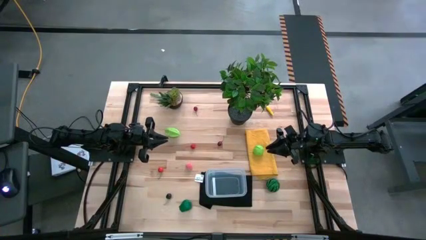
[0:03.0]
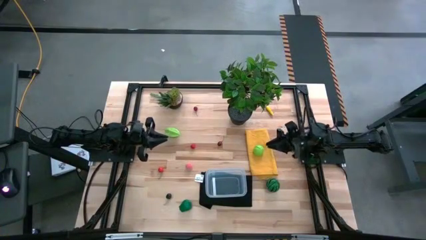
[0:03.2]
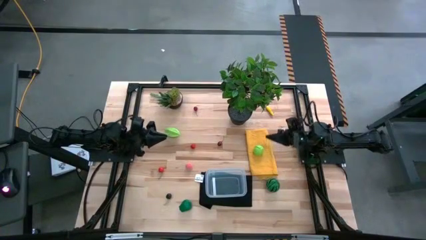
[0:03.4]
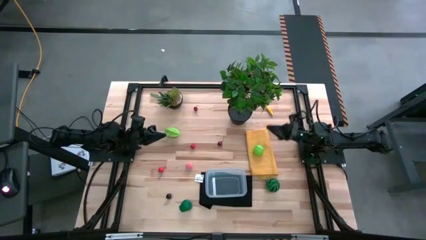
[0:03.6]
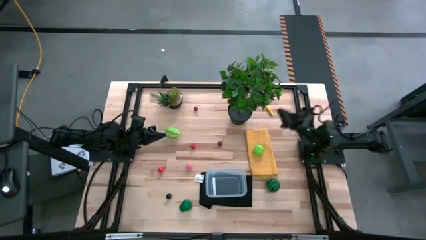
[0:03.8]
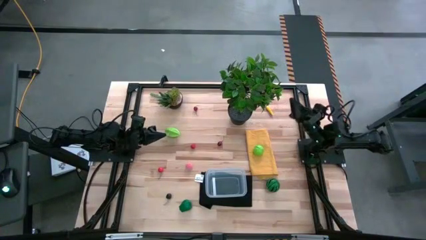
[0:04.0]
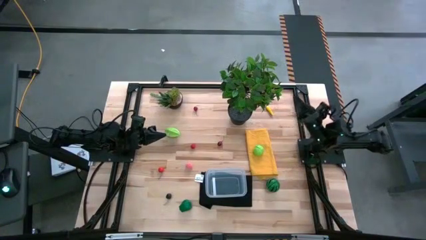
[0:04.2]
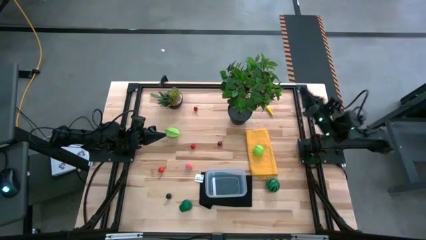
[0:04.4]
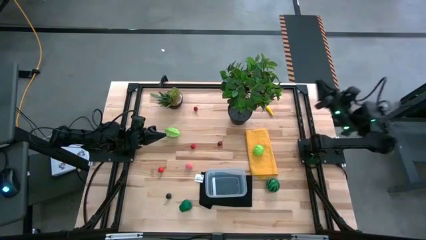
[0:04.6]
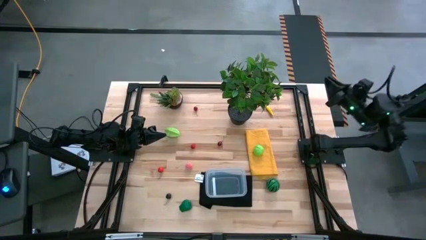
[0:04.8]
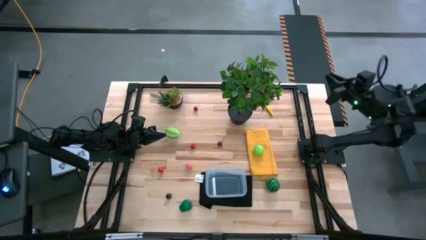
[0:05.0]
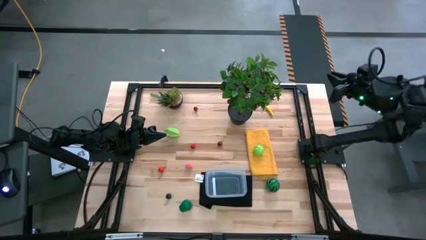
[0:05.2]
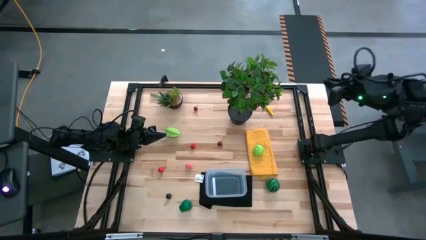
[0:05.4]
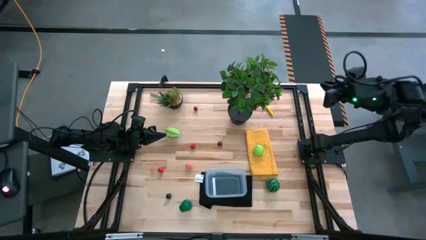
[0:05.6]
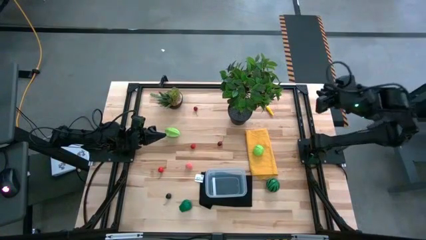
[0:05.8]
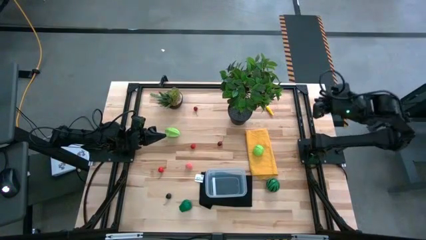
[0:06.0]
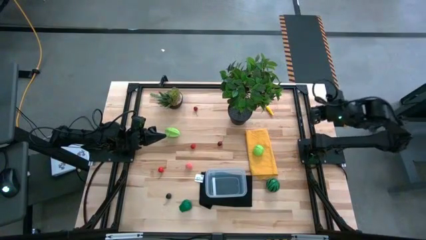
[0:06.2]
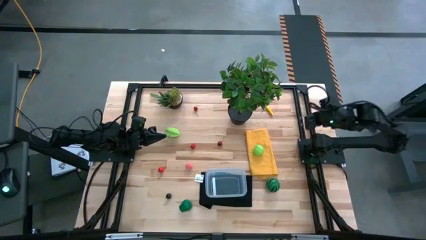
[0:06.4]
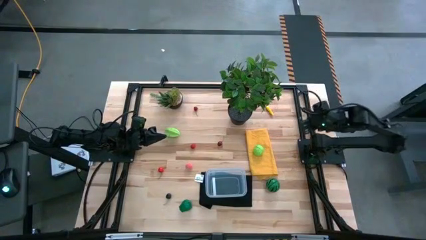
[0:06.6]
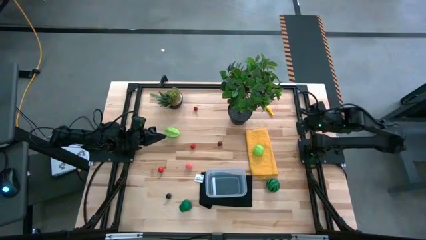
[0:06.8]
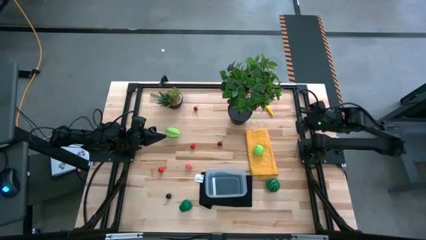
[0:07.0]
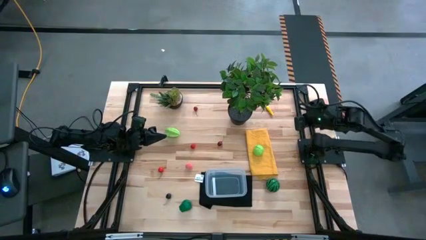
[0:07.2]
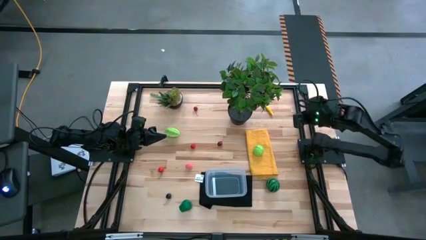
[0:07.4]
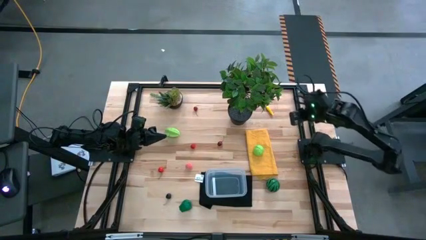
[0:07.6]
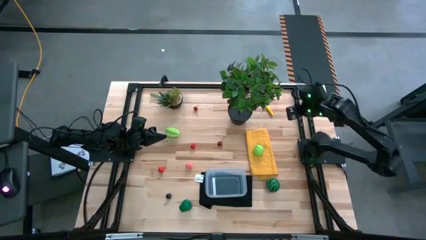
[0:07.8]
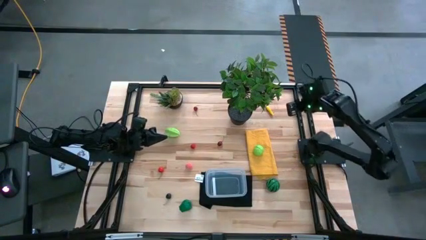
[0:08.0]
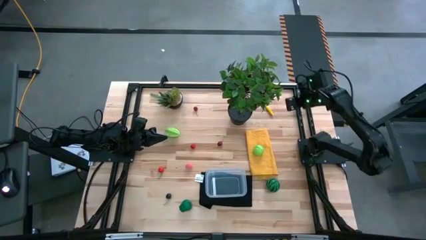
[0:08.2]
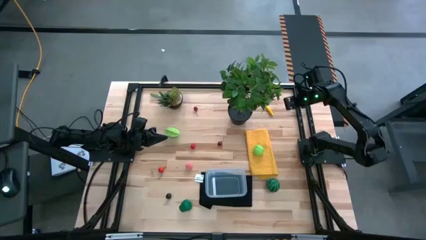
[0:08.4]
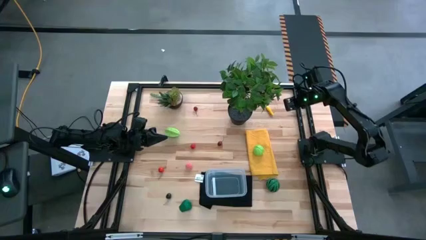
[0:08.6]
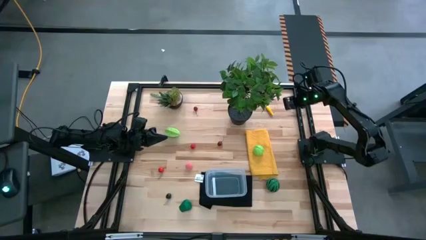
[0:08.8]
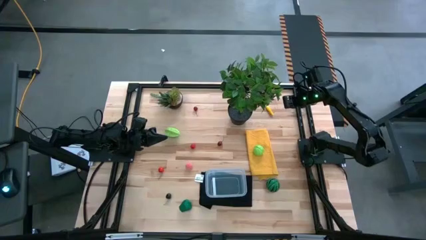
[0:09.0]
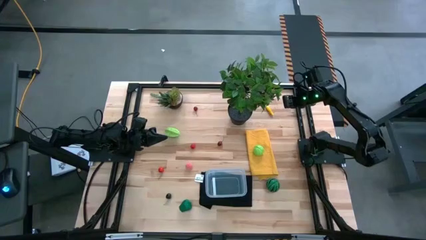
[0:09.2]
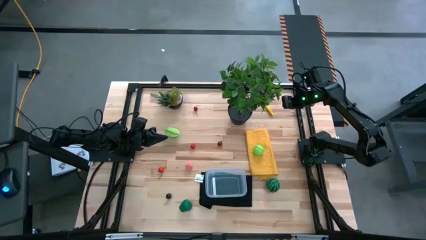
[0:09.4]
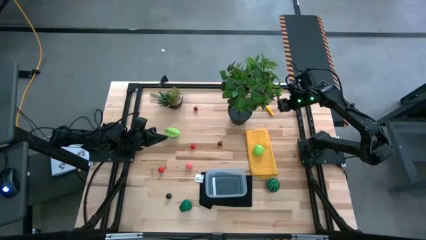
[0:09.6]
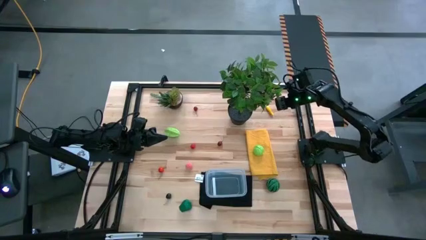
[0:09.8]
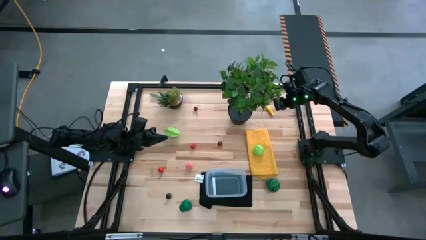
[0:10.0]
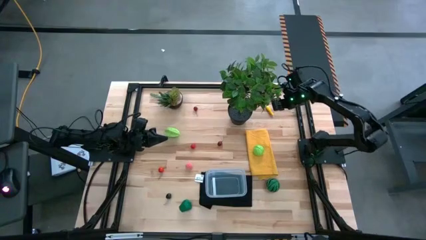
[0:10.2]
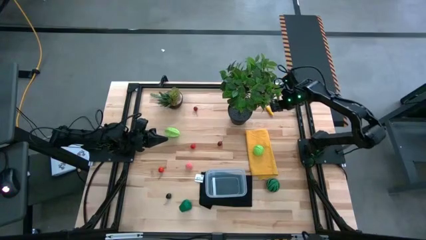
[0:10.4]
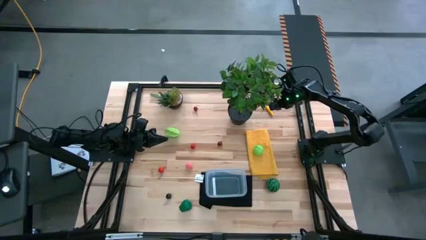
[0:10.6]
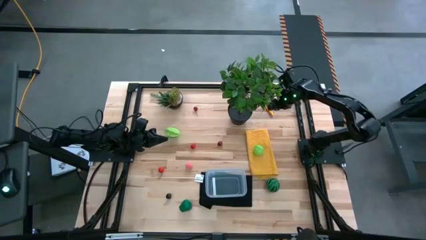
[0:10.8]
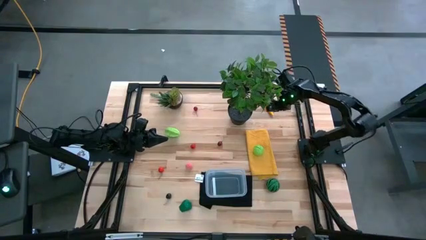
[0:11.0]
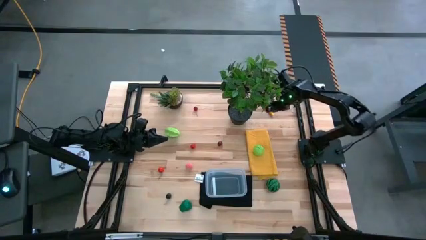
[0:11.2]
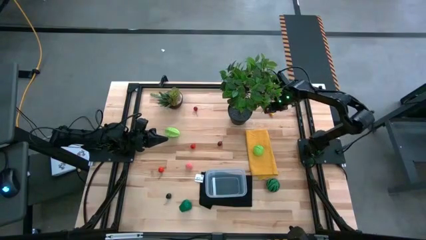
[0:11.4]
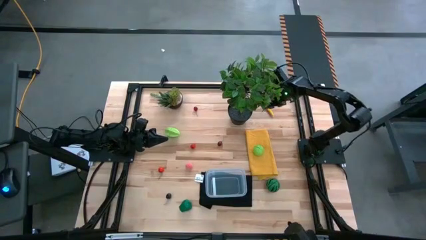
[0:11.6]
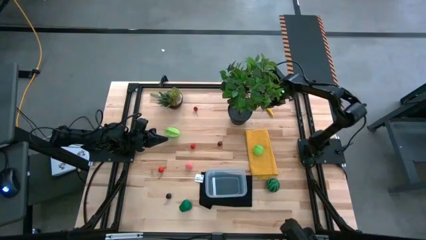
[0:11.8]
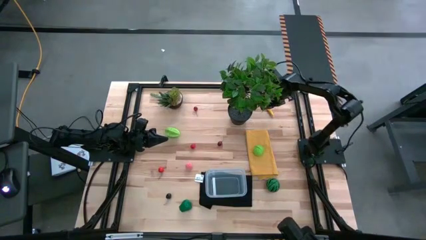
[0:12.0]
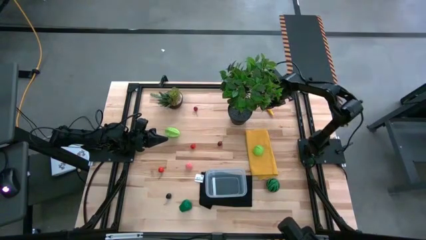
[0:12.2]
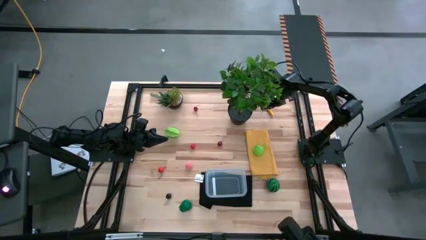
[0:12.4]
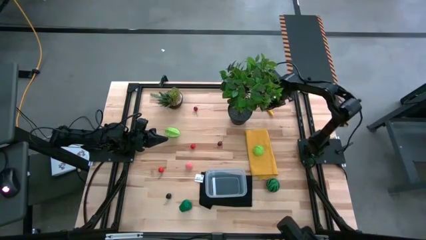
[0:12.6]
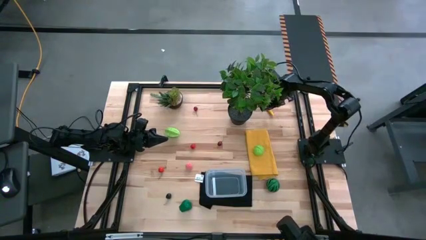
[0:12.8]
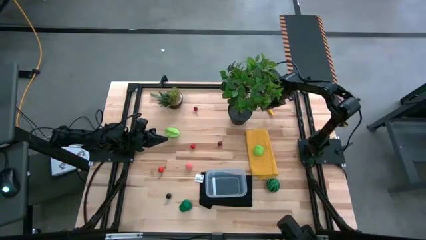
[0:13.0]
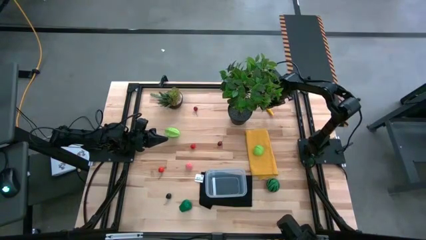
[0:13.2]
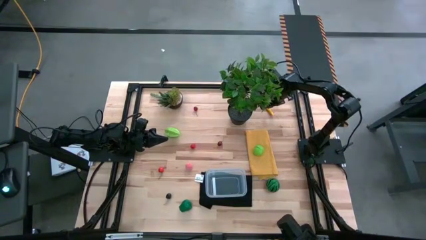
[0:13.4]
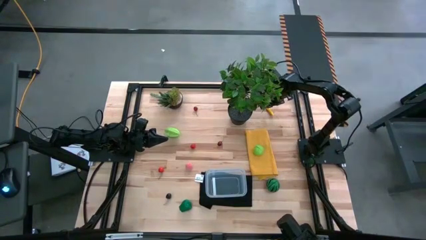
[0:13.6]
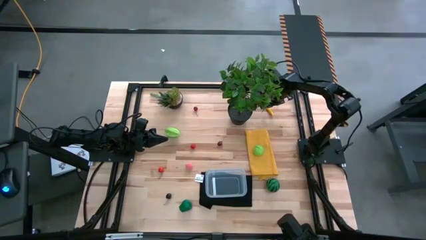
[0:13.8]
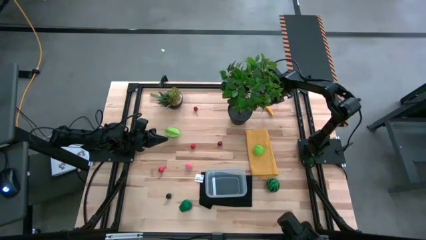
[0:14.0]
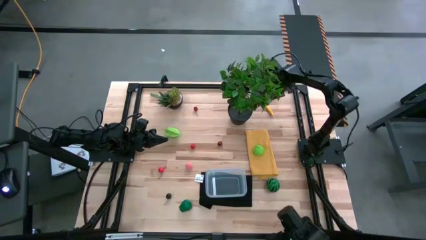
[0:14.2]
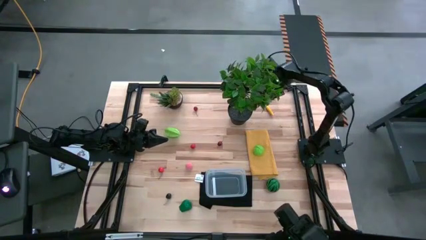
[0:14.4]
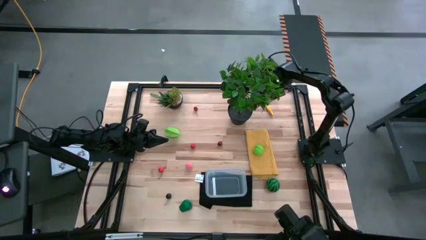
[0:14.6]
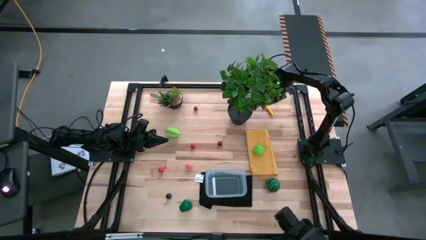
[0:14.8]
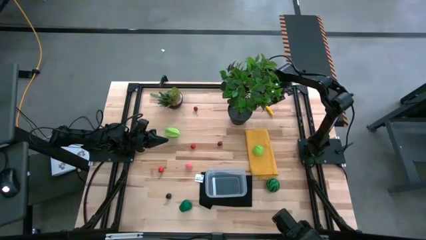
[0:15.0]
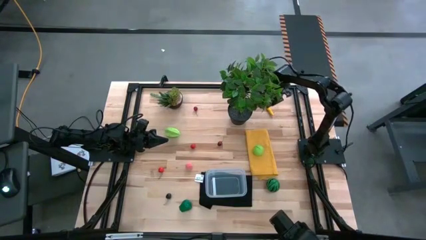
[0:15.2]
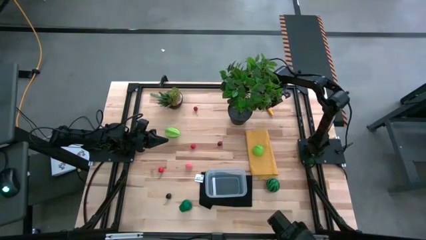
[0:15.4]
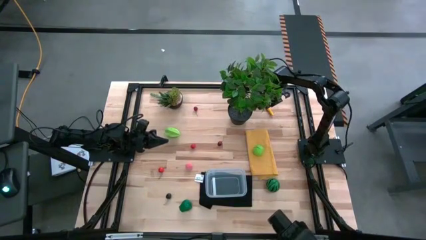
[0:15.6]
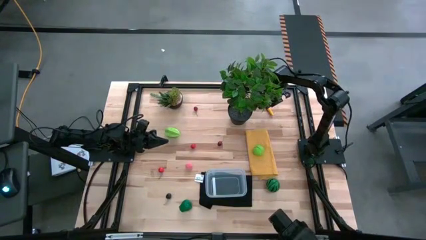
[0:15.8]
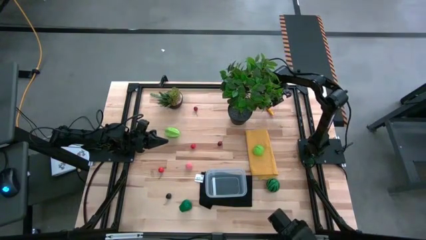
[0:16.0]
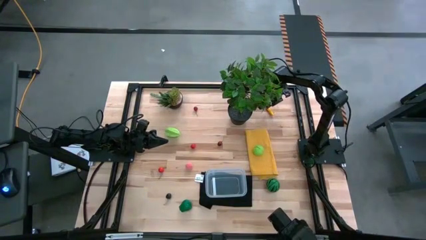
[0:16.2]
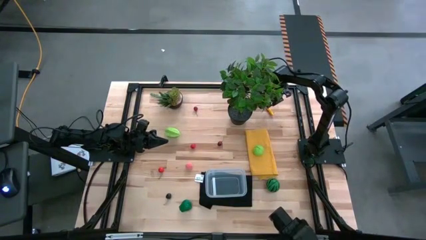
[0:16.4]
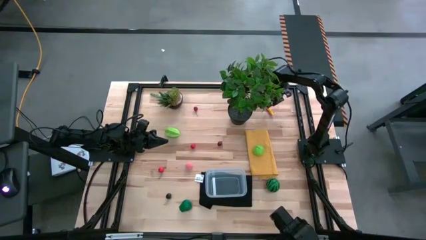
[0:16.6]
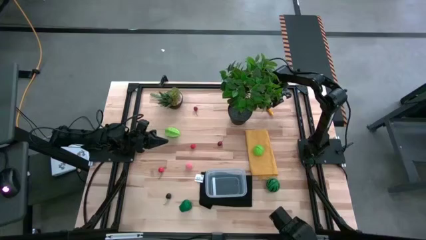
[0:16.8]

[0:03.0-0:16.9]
Task: Pick and placing Produce into tupperware
Put the corn into the transparent bin
